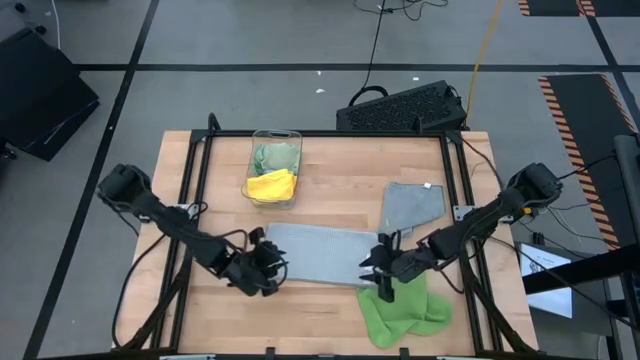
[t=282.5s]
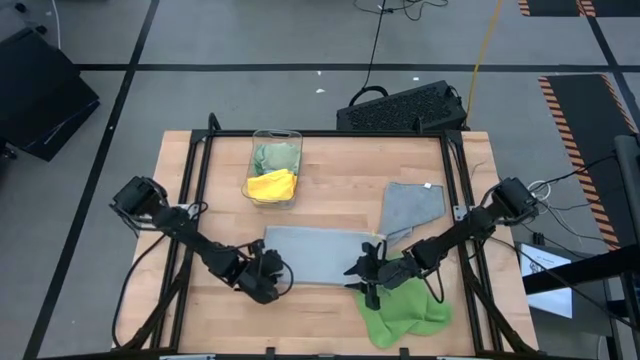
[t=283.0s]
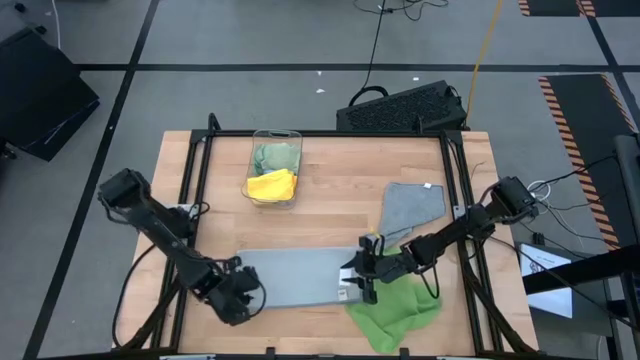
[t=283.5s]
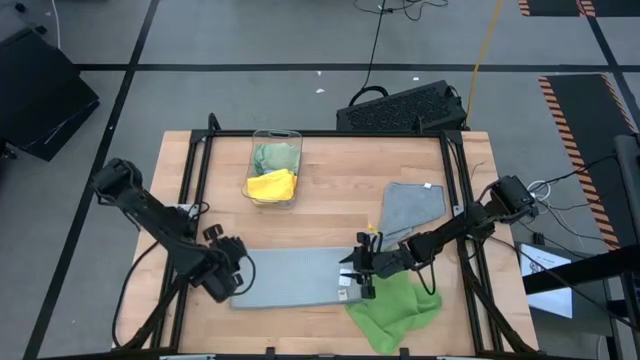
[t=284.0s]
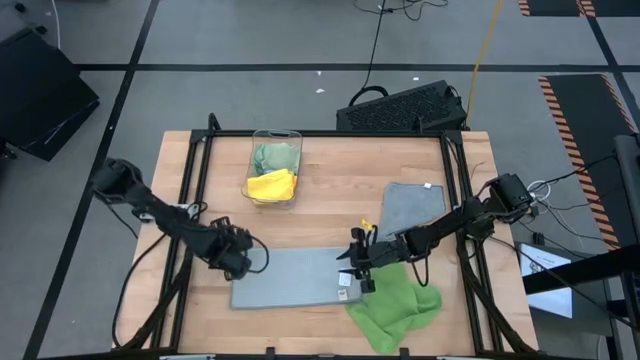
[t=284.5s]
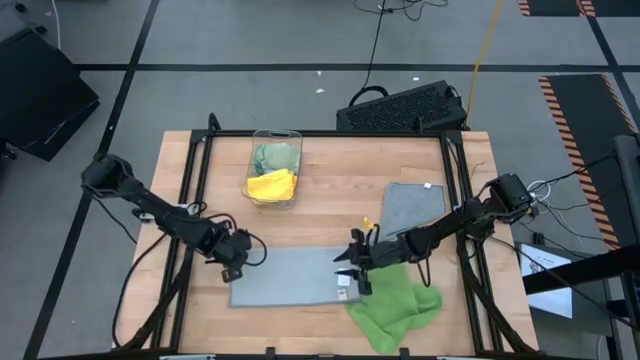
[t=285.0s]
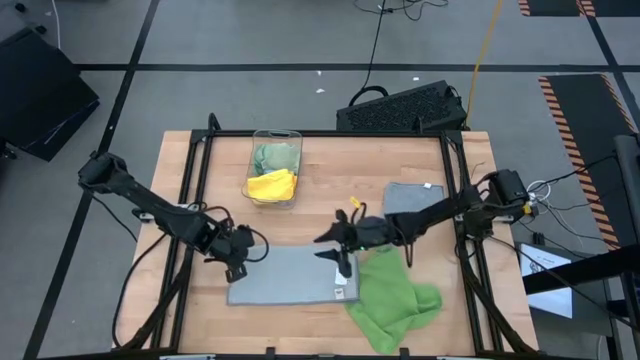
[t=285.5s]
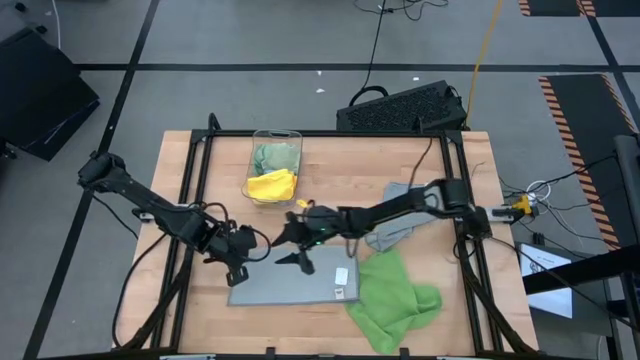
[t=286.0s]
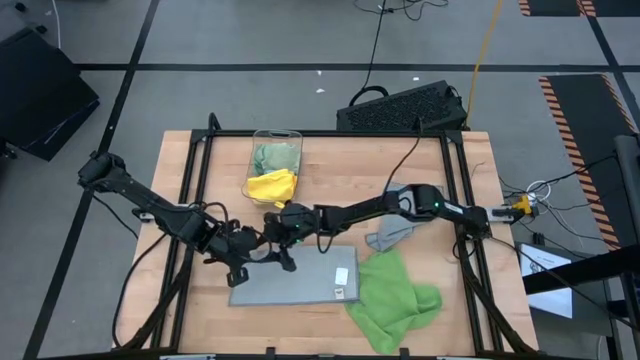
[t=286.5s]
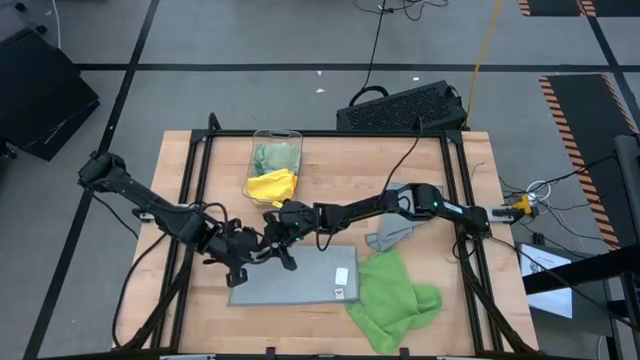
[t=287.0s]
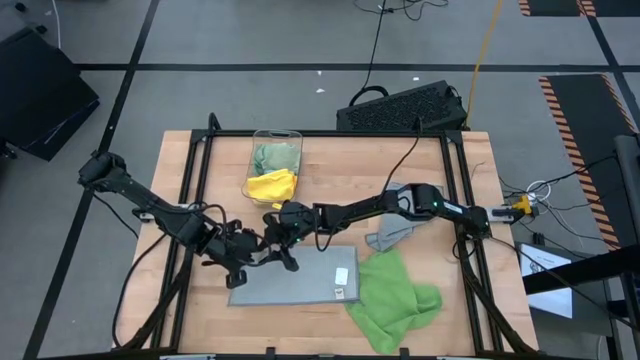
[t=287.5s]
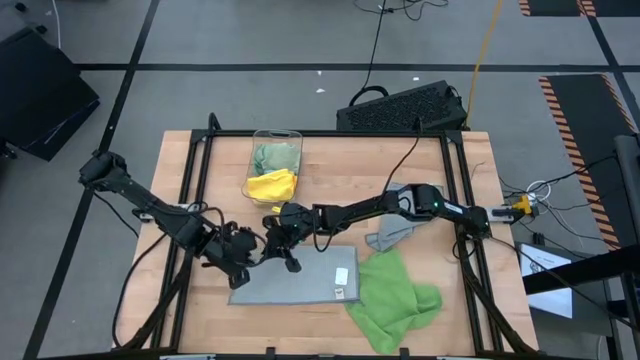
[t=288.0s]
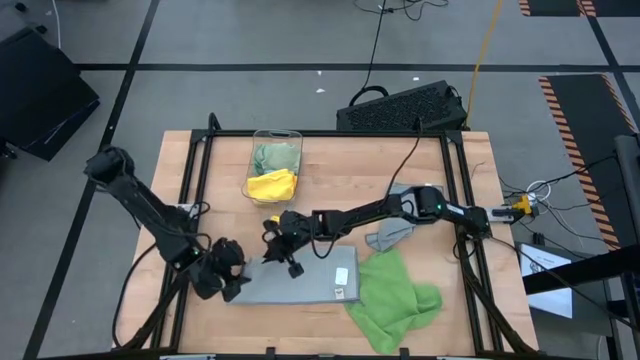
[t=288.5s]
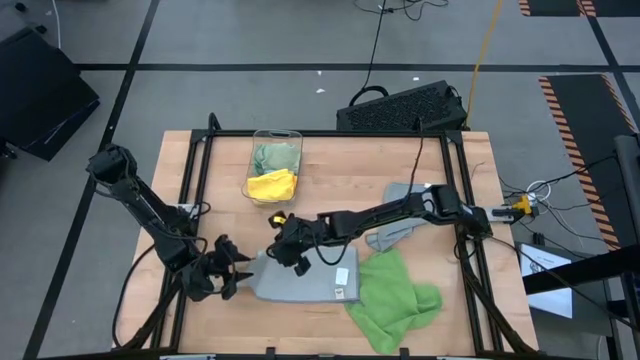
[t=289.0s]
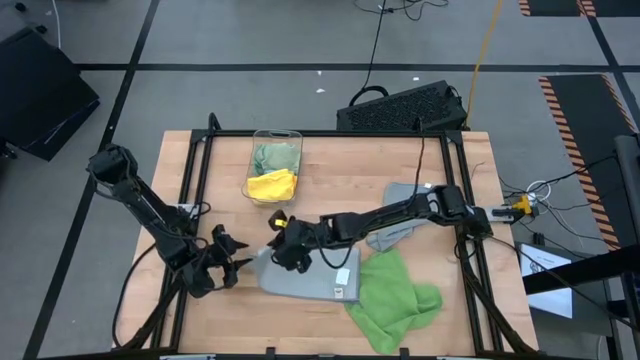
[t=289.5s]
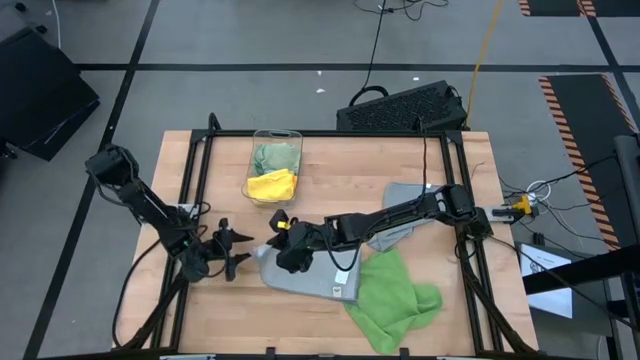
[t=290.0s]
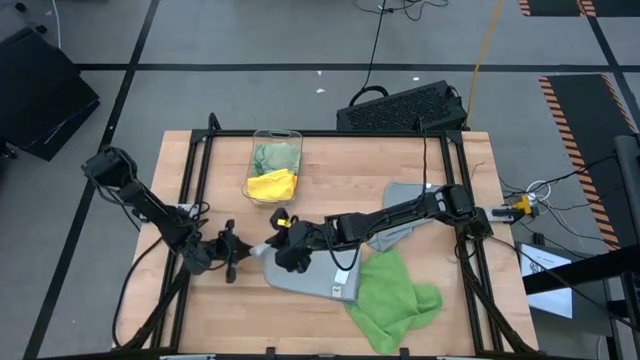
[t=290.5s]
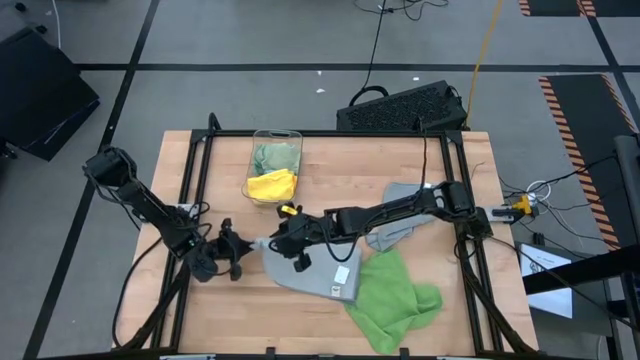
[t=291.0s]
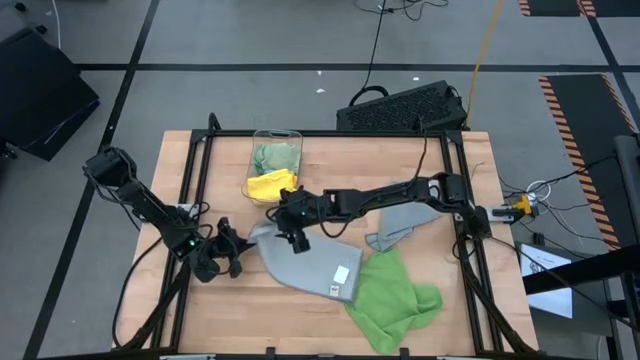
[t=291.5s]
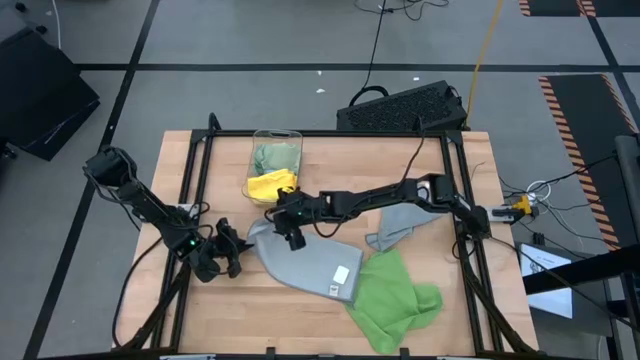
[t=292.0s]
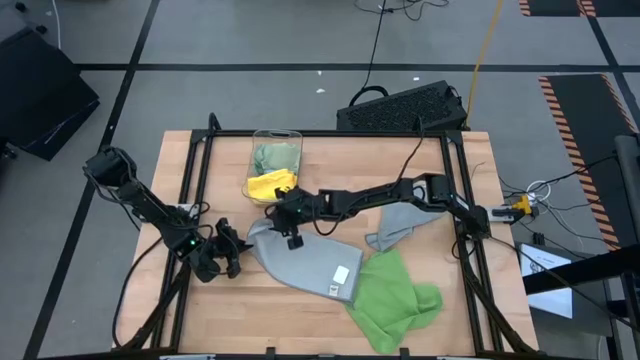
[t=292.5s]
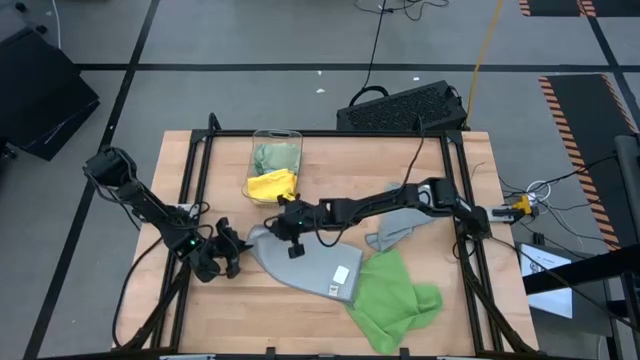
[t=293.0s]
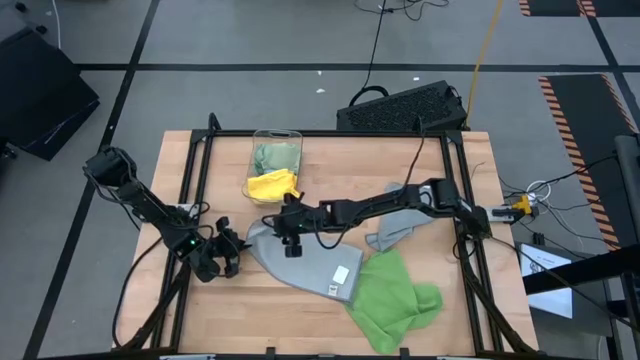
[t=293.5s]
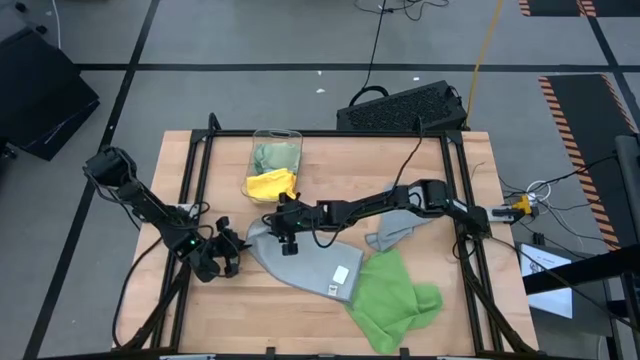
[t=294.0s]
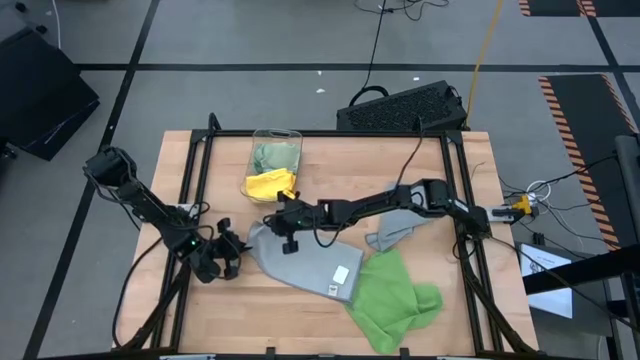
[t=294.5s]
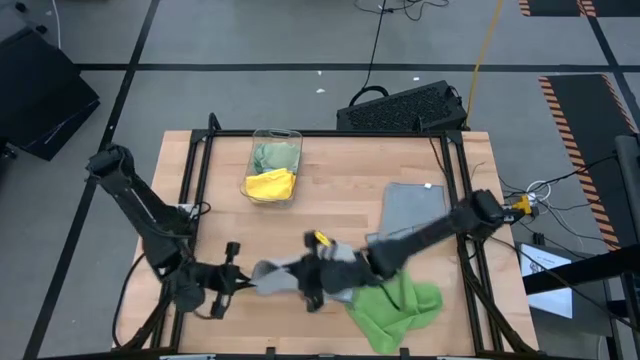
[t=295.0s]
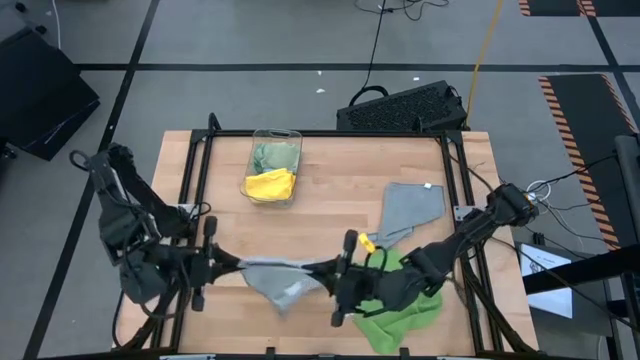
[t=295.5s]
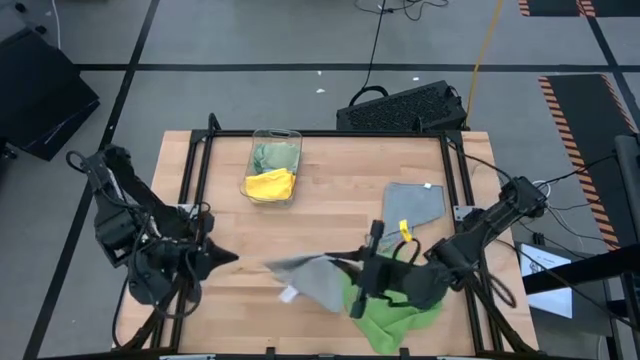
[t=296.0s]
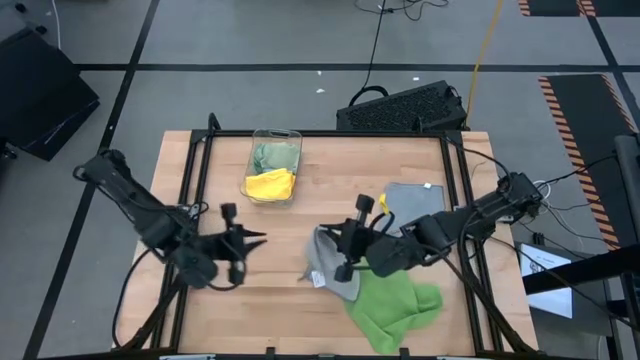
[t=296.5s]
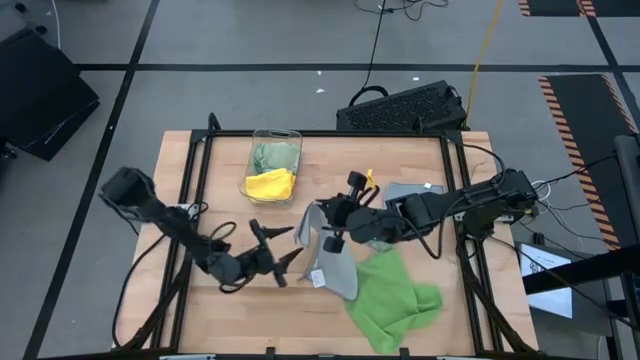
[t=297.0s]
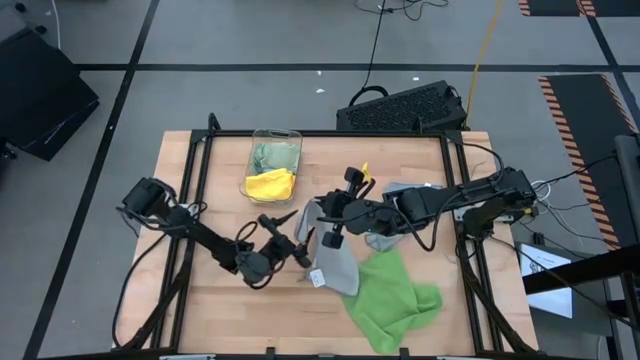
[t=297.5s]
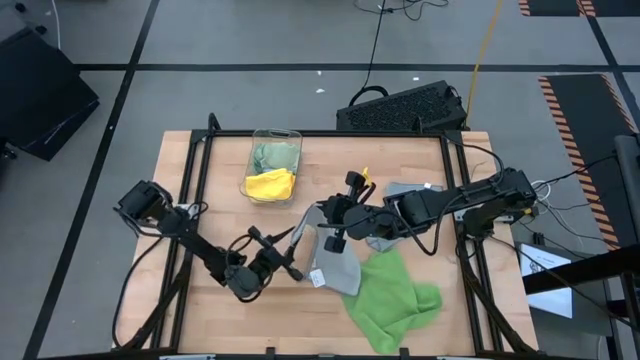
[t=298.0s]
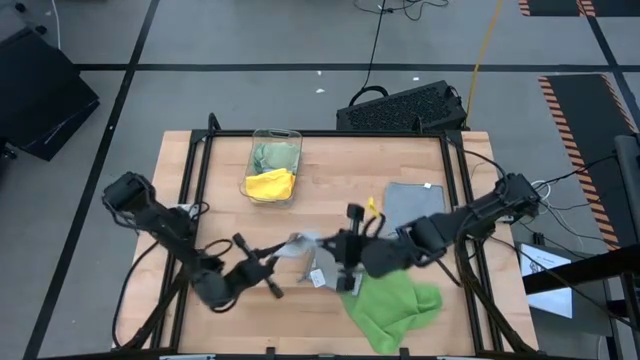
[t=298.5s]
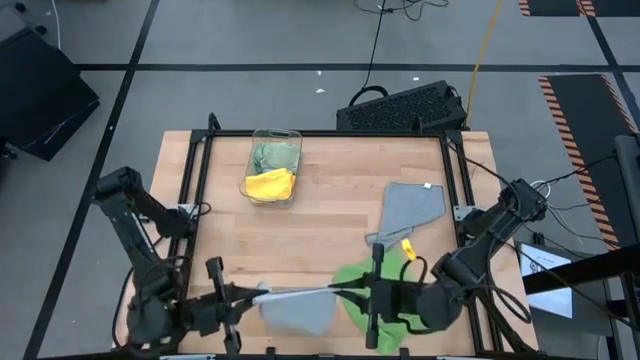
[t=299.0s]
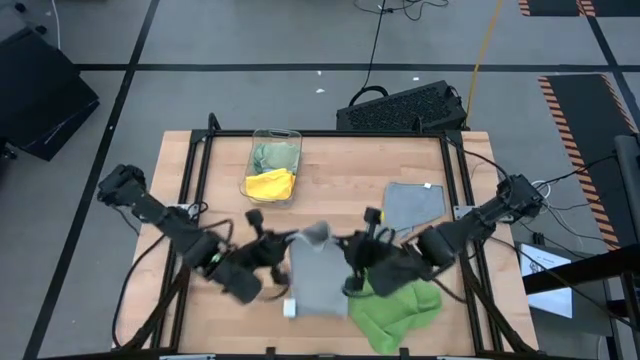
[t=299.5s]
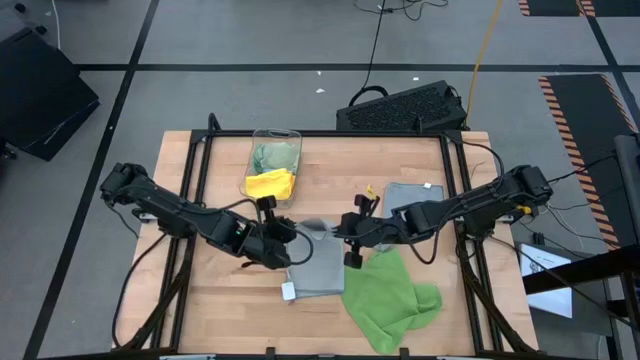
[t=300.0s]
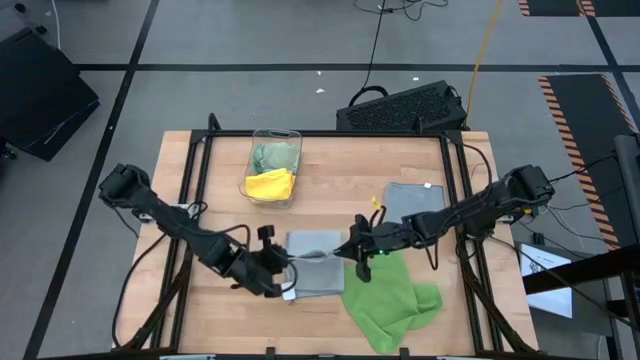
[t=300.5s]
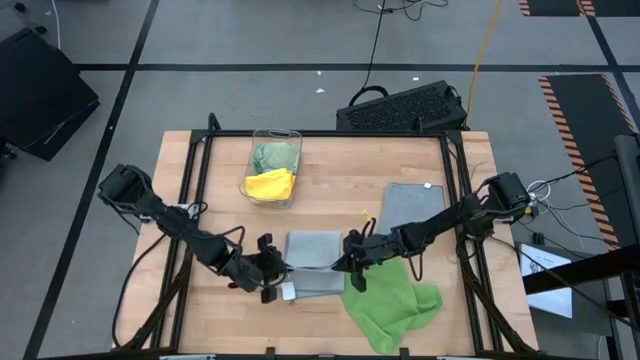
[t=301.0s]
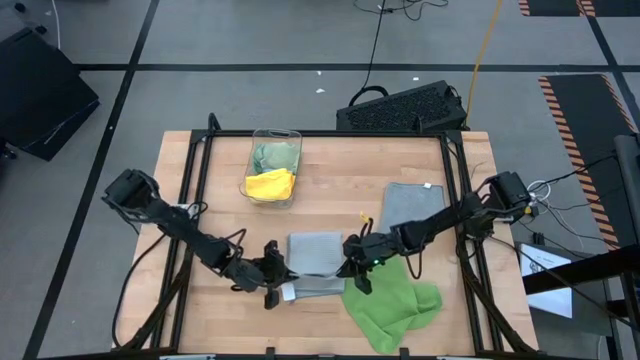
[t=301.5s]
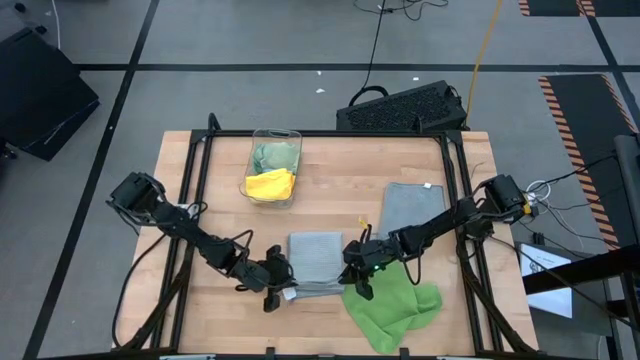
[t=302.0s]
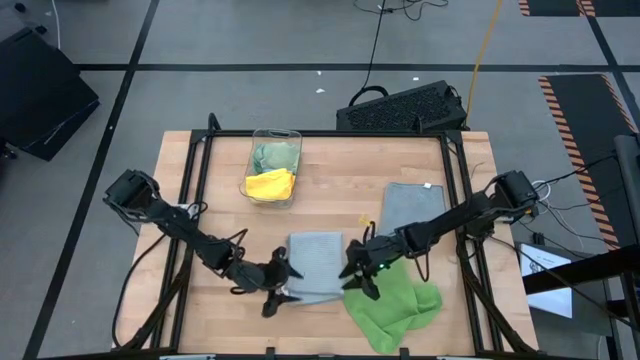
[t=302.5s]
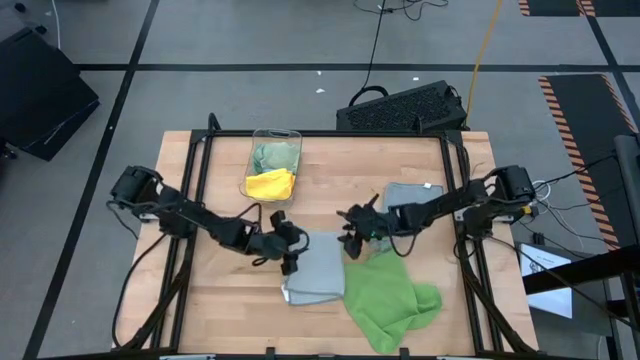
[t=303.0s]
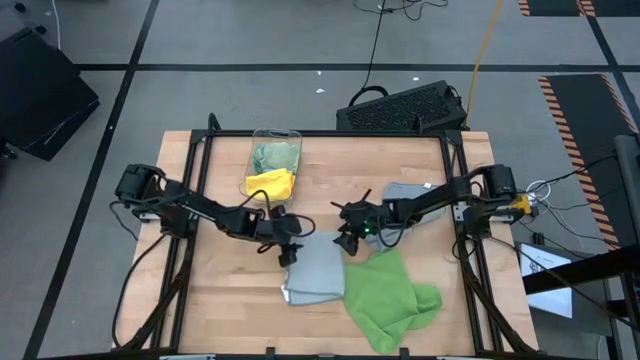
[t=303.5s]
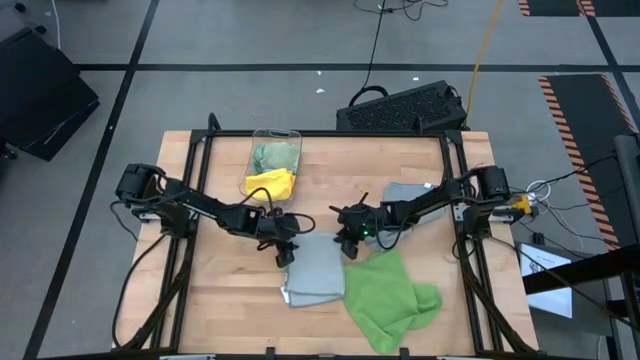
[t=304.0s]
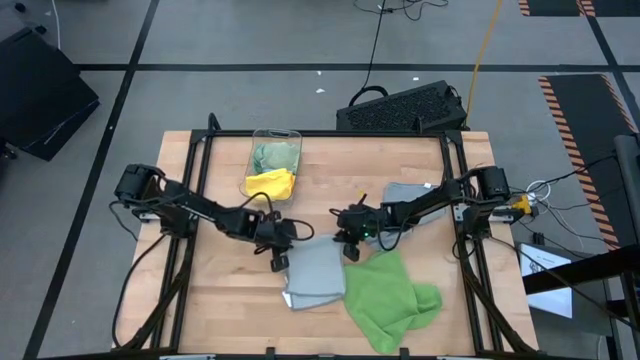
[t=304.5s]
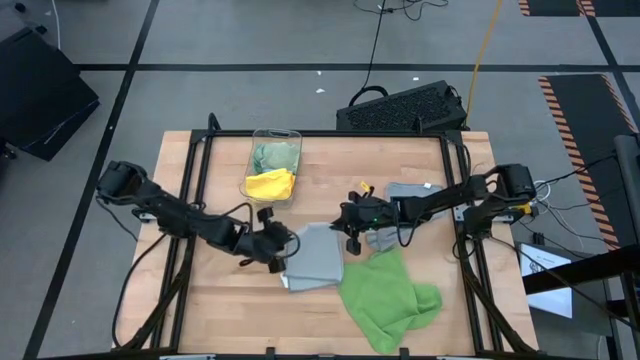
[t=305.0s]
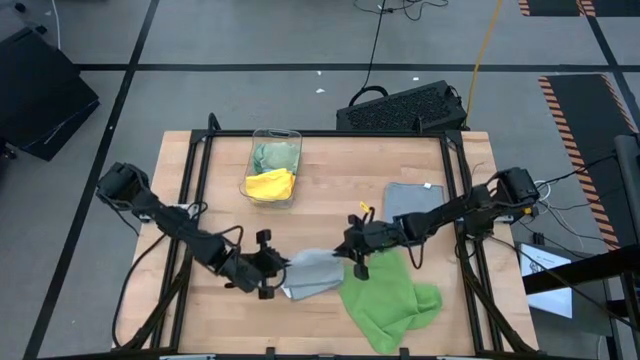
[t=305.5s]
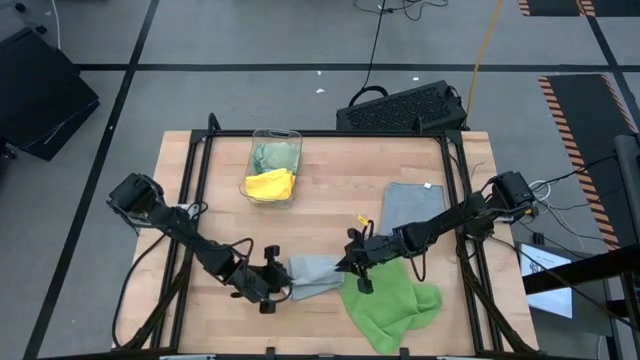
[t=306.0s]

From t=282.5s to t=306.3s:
Task: Fold microfiber towels
Fold the left gray microfiber cloth on the table
